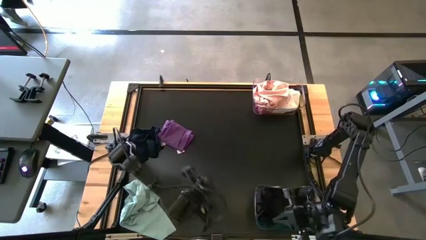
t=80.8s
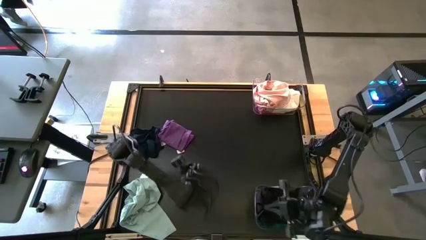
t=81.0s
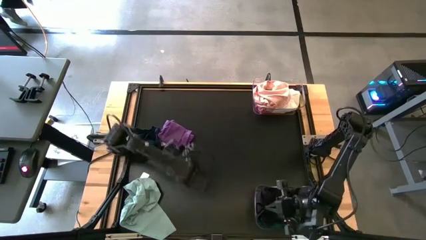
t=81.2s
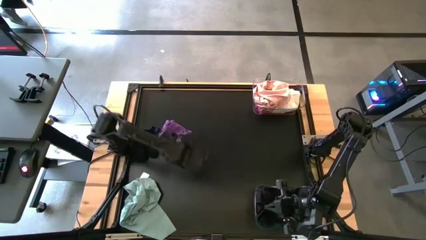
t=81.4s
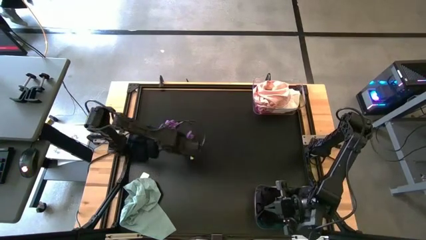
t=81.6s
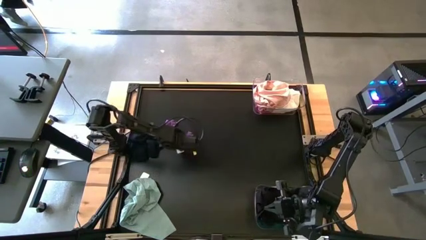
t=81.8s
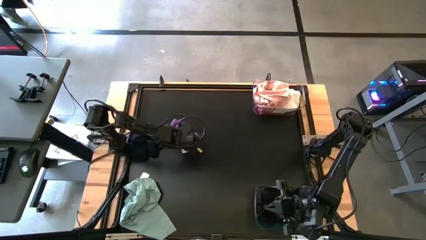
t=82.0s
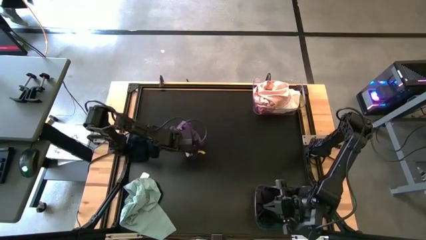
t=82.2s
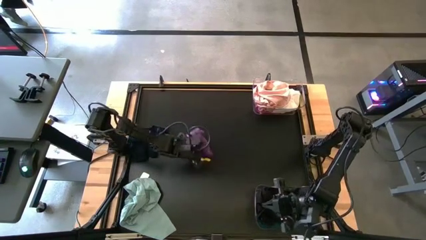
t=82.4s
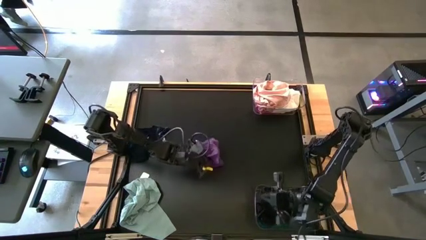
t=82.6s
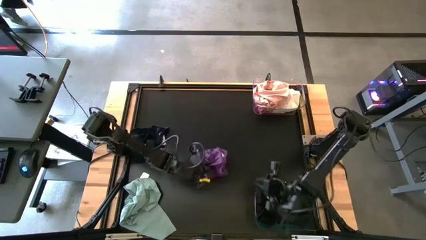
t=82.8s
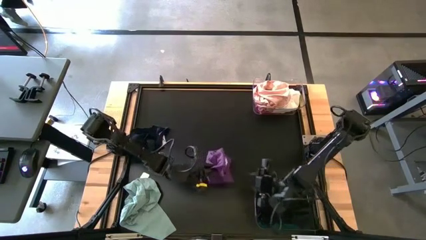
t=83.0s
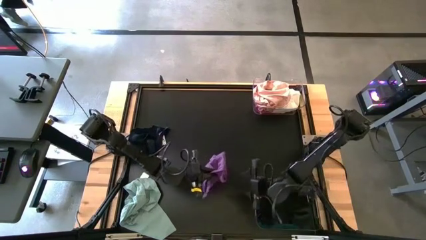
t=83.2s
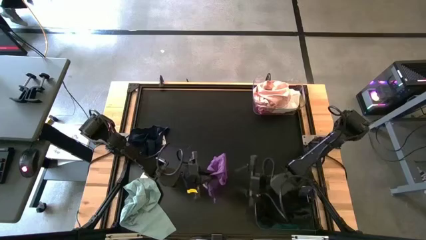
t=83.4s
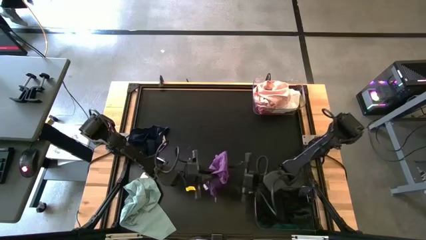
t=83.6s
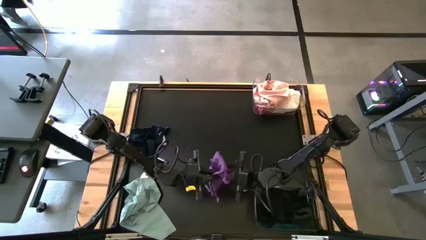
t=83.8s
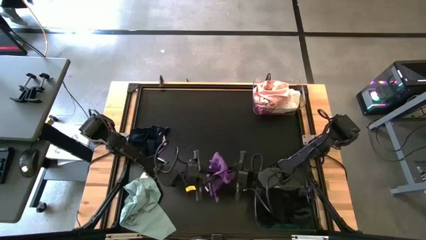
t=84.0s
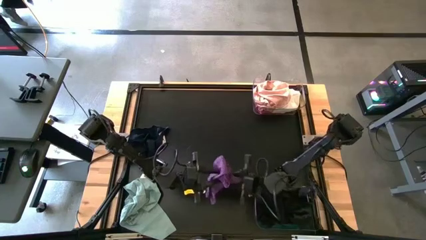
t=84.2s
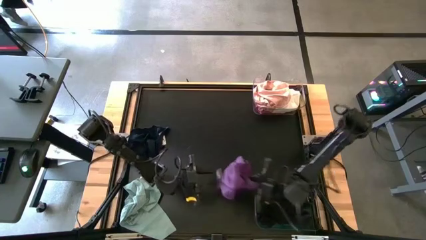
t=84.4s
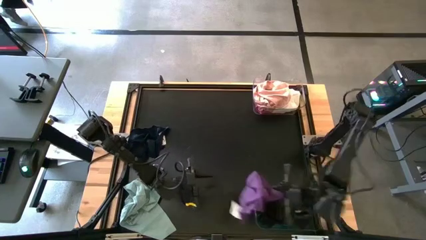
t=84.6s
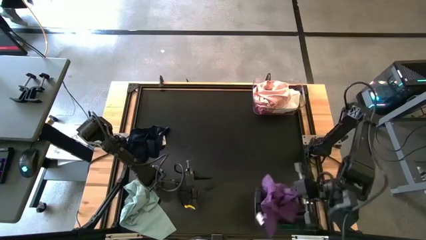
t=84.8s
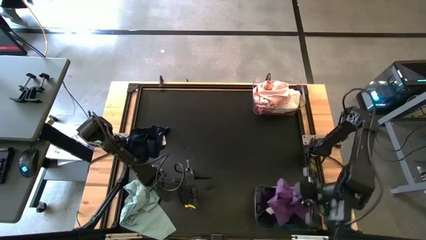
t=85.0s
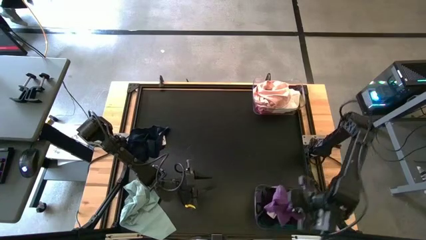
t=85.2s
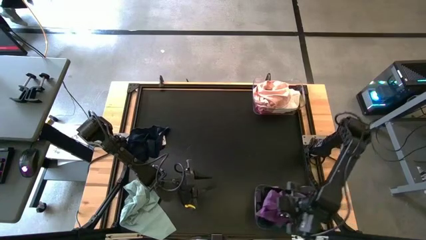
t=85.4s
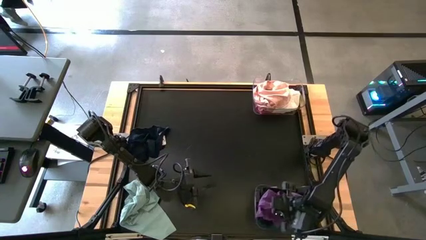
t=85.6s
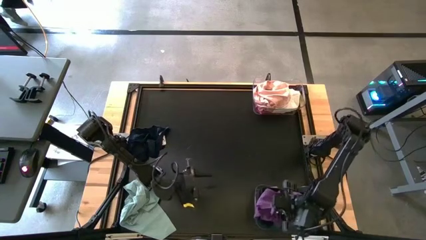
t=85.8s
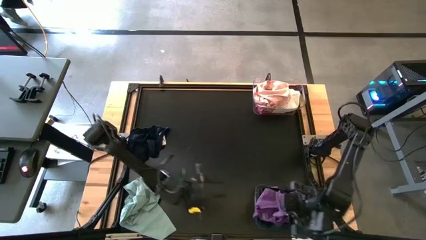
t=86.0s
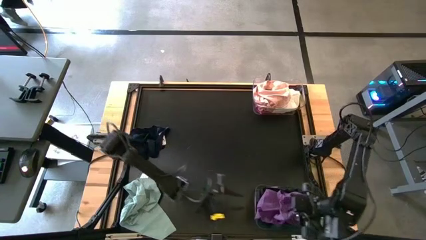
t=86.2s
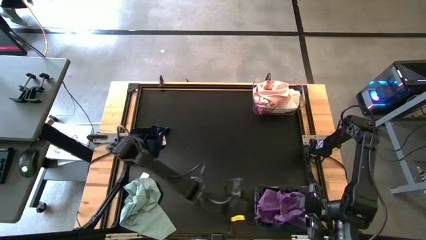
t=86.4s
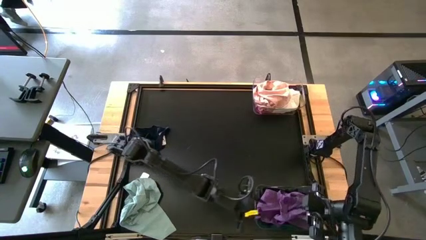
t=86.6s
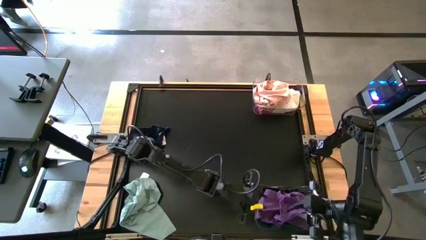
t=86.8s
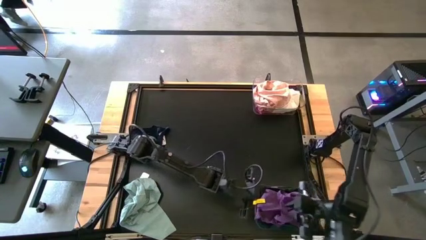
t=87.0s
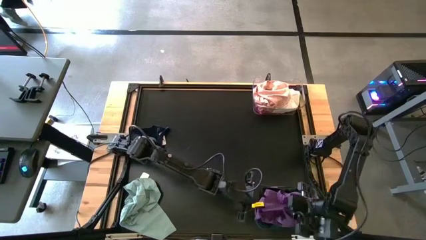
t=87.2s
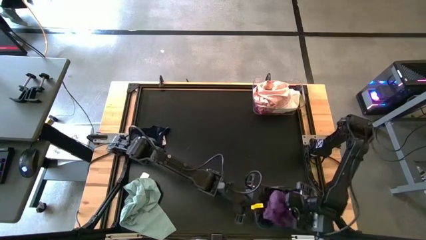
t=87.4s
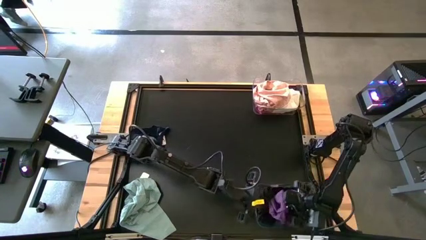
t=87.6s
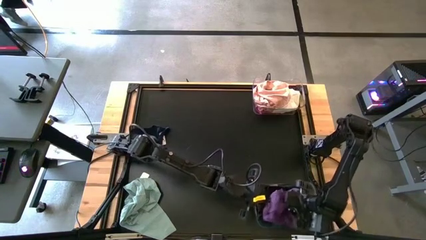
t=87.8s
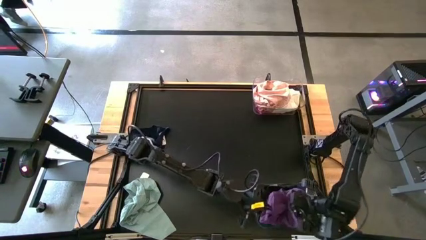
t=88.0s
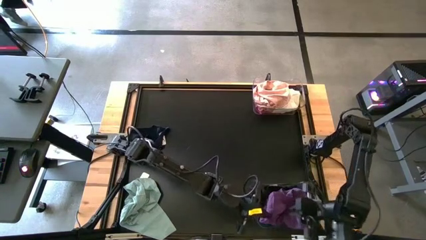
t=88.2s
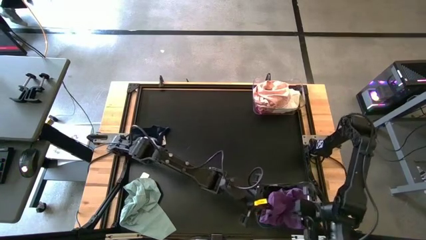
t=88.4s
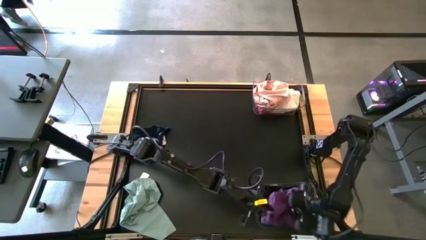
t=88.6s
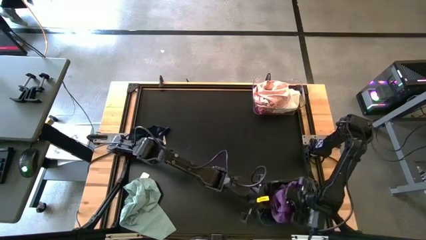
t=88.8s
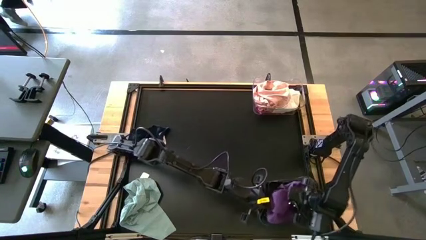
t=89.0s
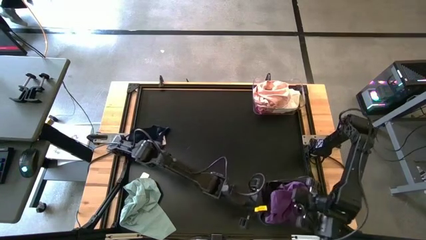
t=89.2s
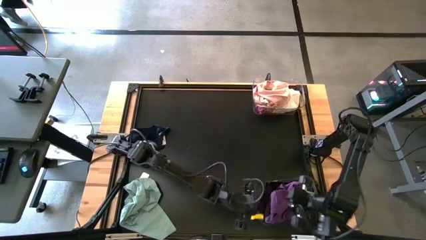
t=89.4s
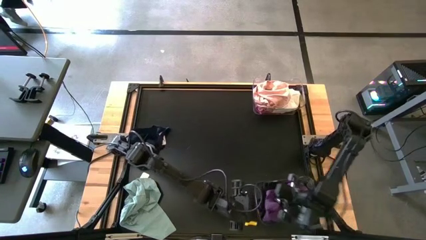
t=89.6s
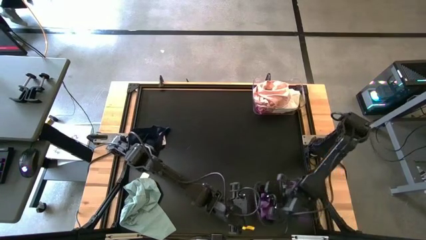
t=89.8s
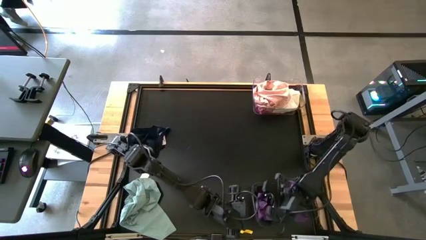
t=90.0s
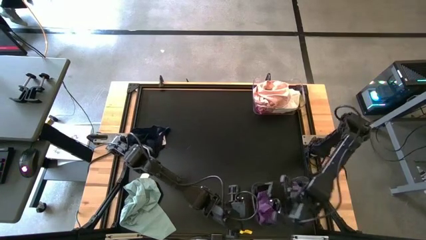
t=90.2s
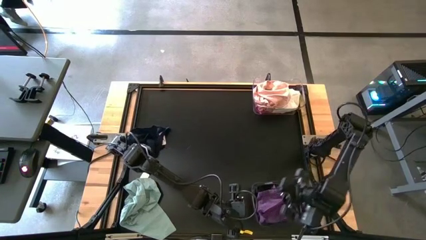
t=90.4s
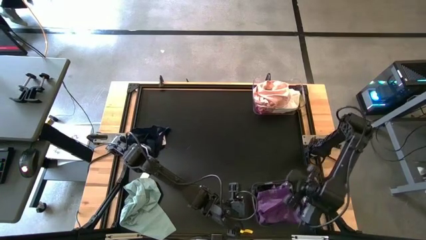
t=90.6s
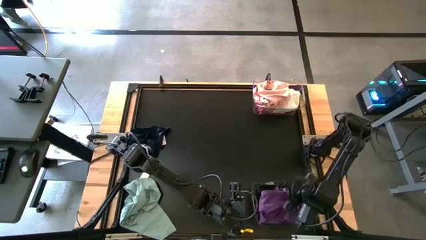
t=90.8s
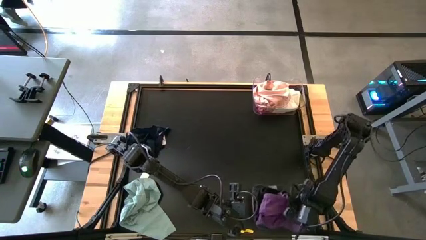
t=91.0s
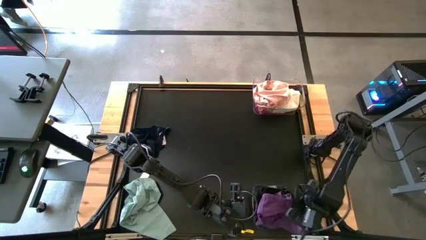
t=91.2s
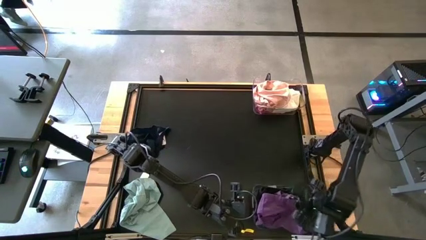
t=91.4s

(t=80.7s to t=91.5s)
Task: Sort towels by color in basket
Put the purple towel into the bottom transparent bin
